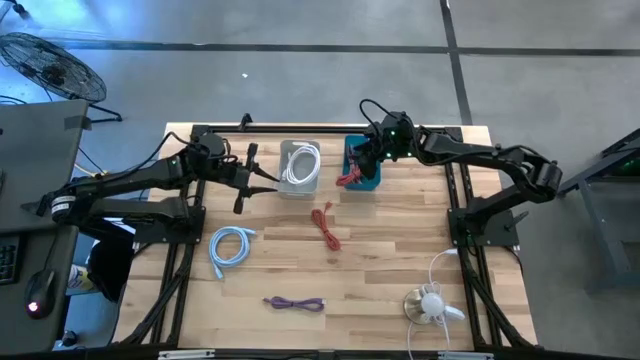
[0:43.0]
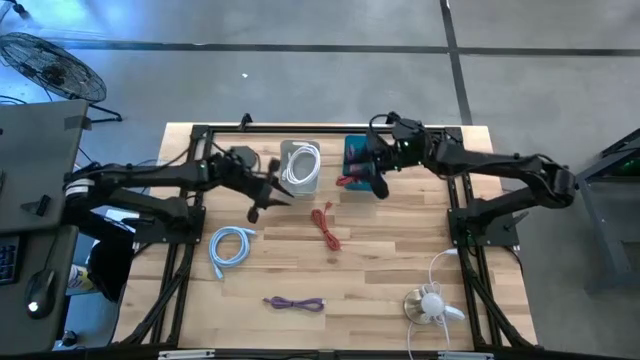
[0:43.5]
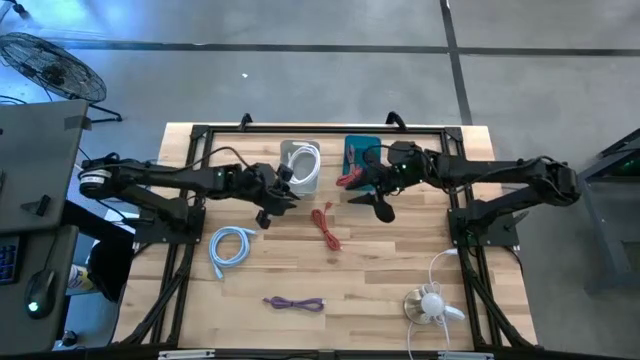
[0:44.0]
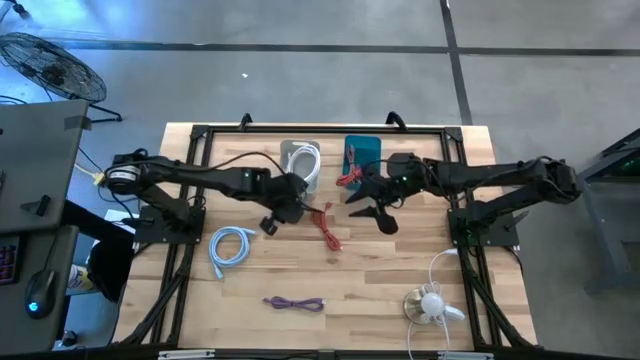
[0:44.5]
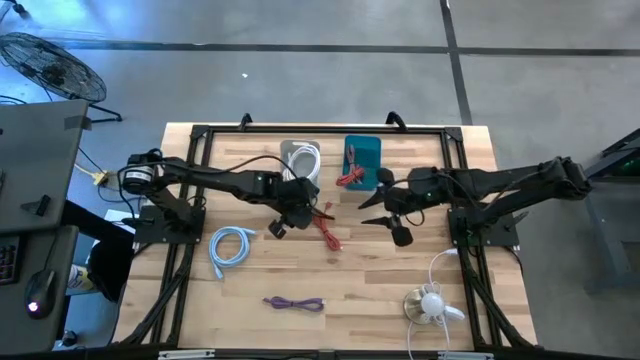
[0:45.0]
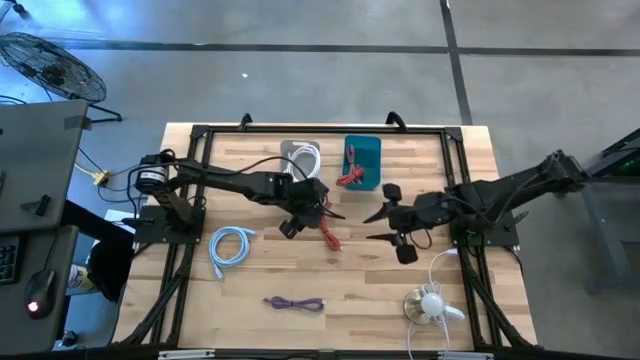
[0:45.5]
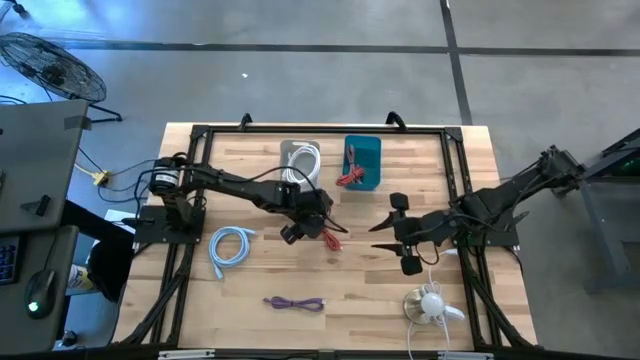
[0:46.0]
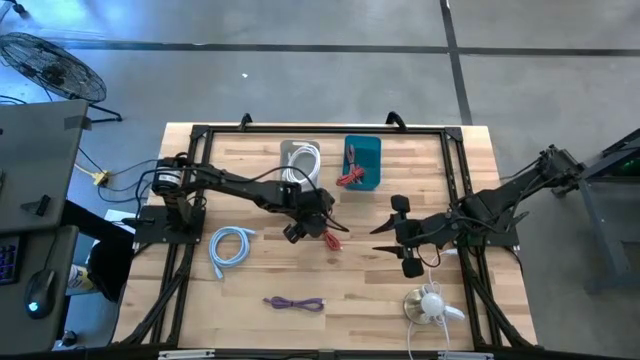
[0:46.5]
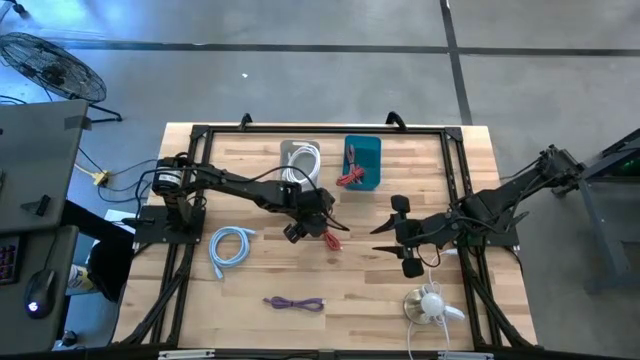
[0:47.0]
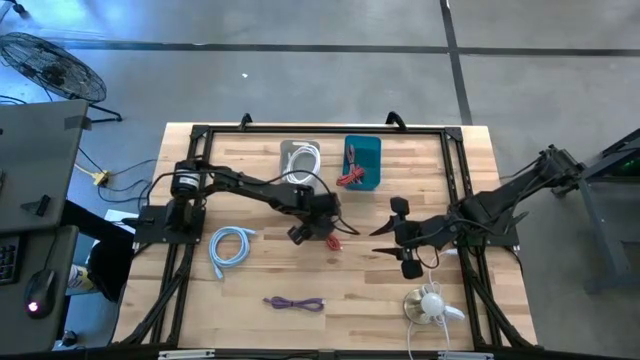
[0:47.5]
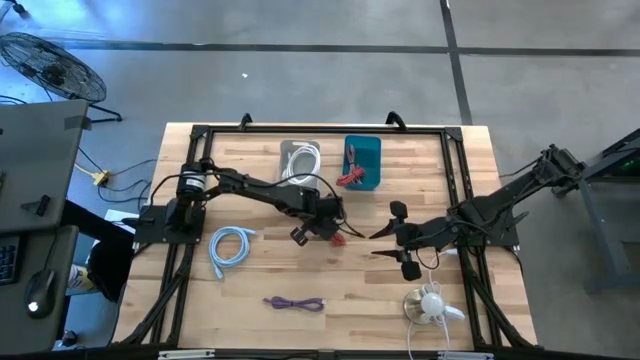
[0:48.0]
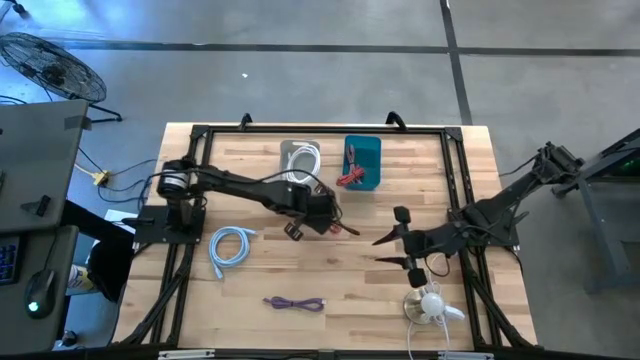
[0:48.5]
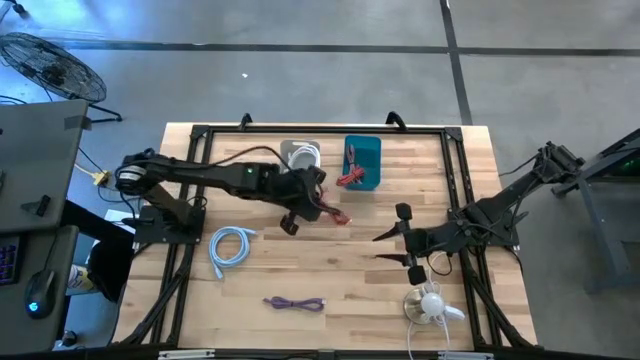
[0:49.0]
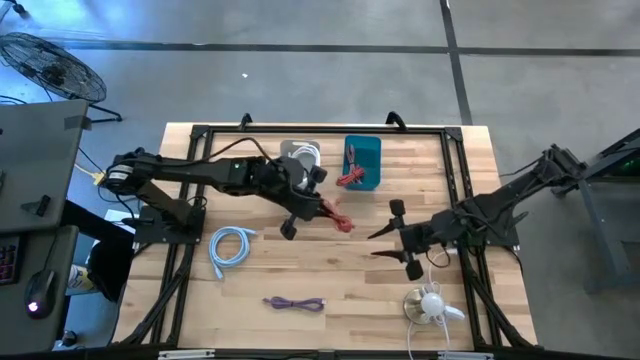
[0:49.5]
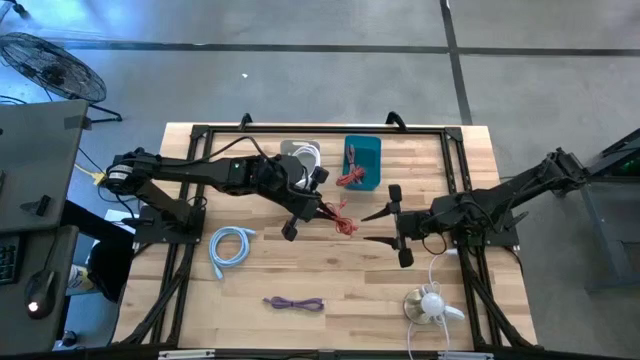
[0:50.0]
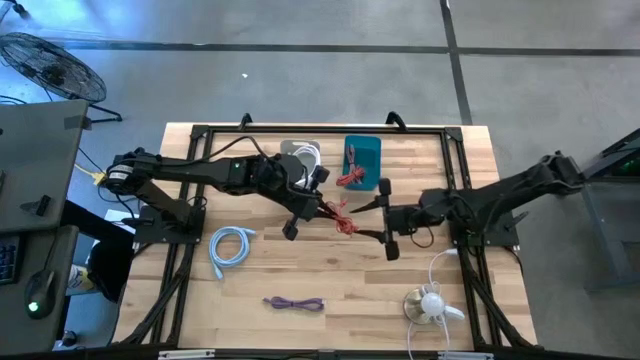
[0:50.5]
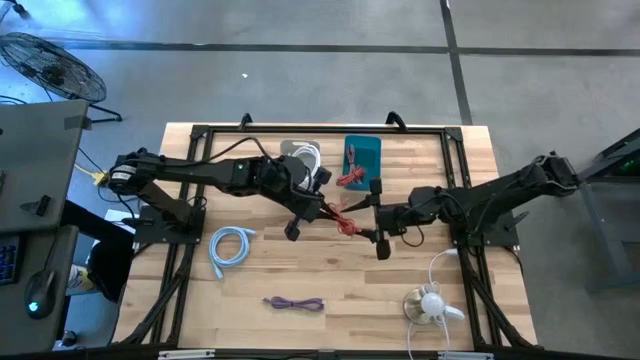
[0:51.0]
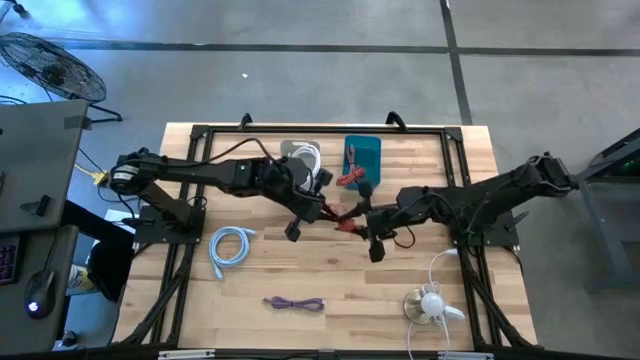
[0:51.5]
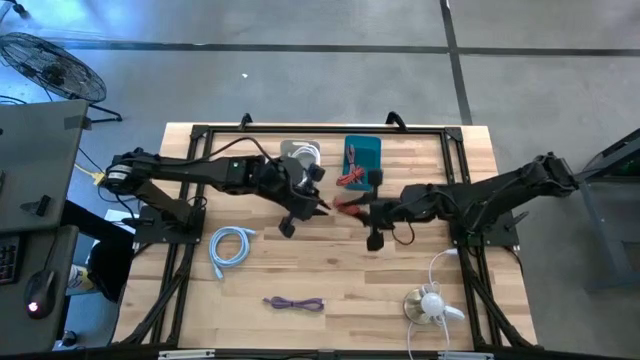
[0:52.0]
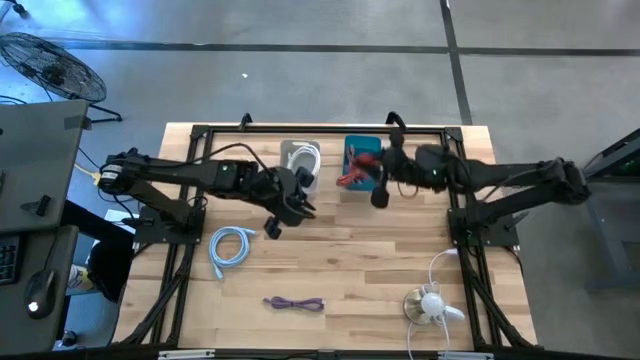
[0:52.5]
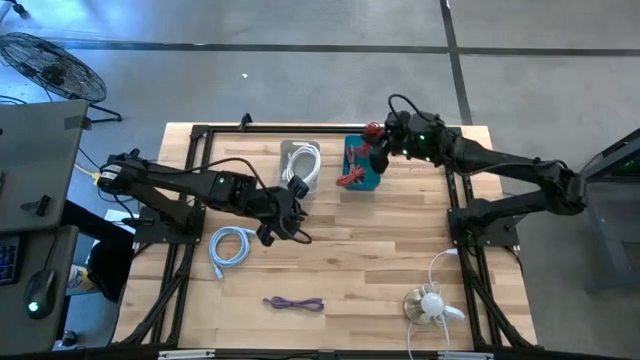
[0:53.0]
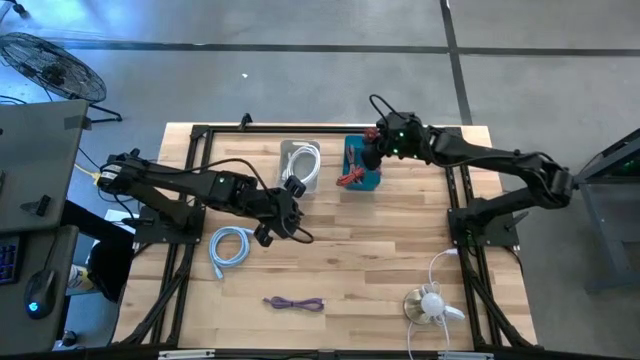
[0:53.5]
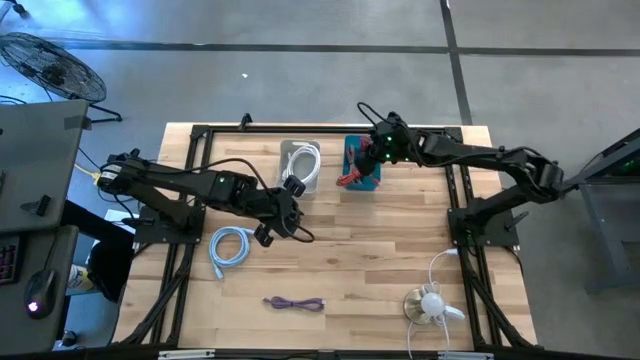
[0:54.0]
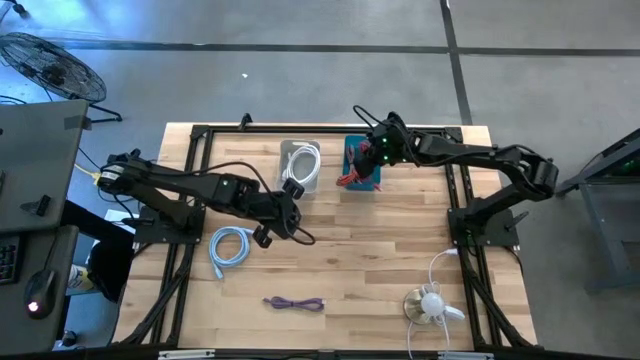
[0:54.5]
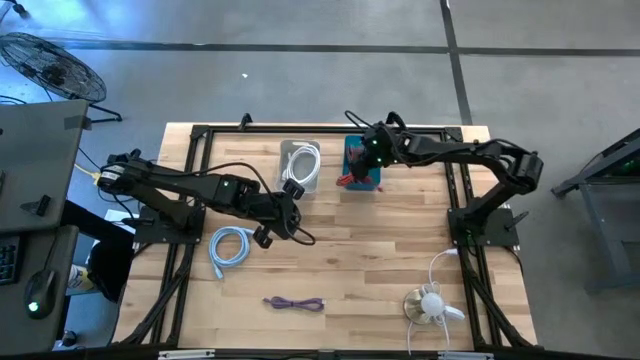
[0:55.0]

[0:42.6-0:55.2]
Task: Pick & Place USB Port
Put the orange charger cable into the blue bin

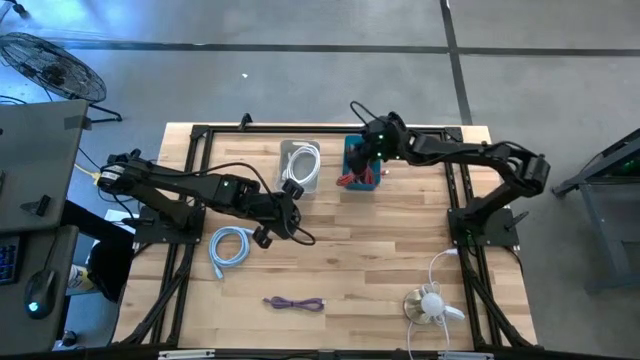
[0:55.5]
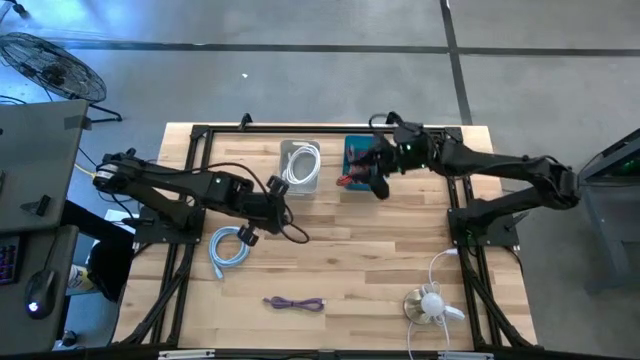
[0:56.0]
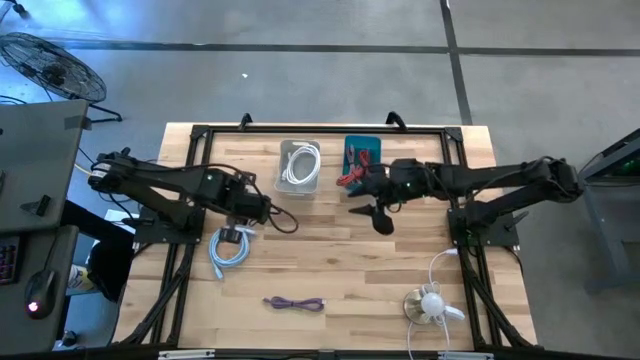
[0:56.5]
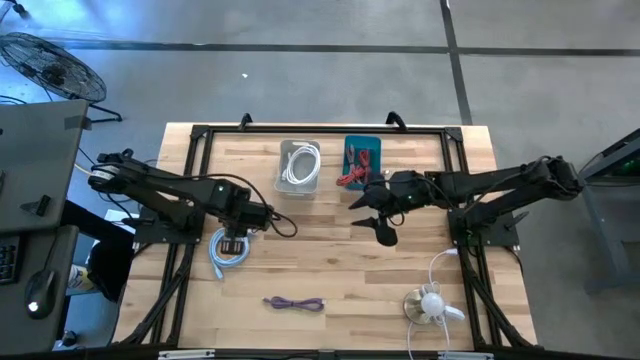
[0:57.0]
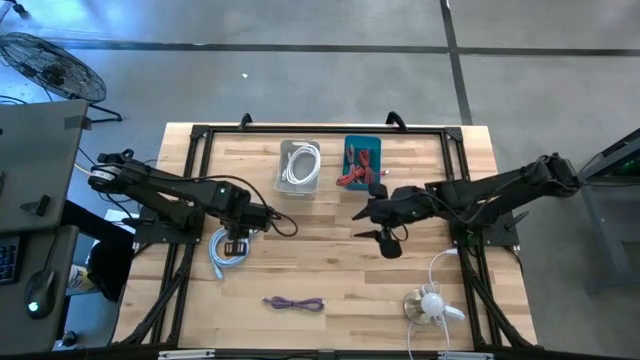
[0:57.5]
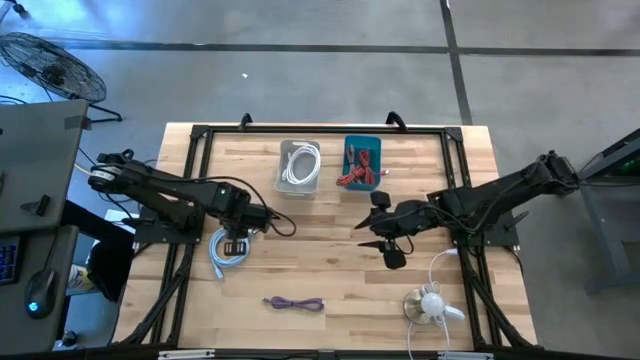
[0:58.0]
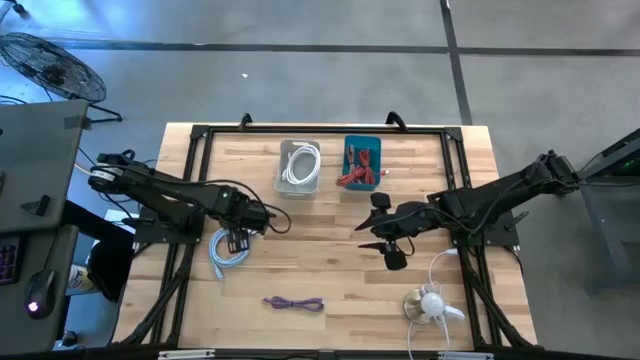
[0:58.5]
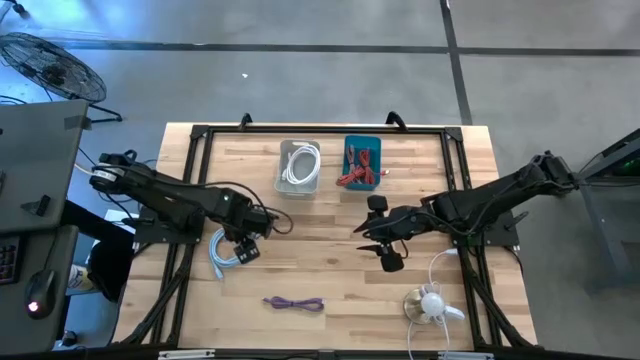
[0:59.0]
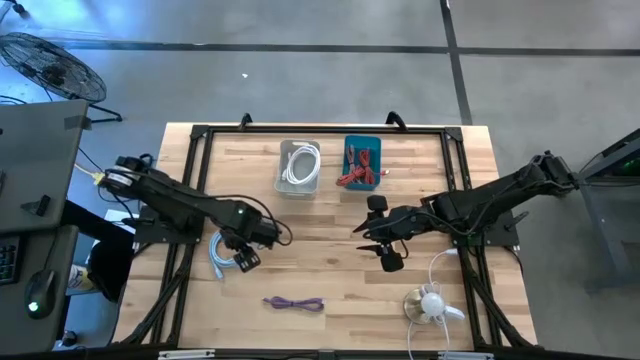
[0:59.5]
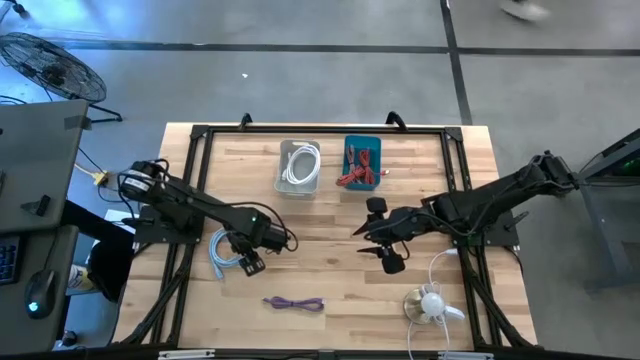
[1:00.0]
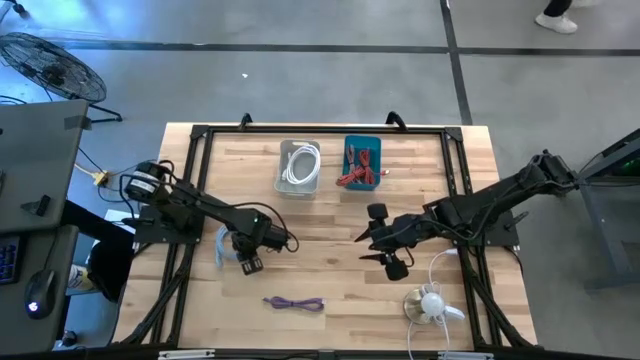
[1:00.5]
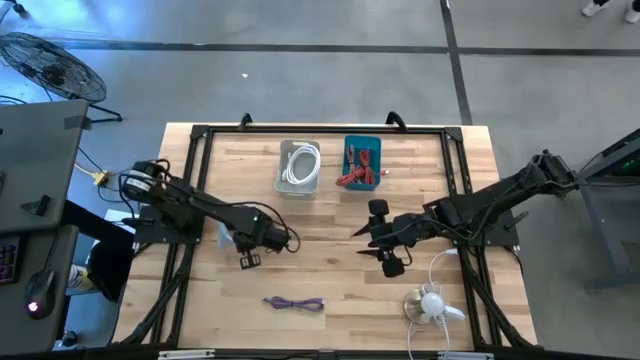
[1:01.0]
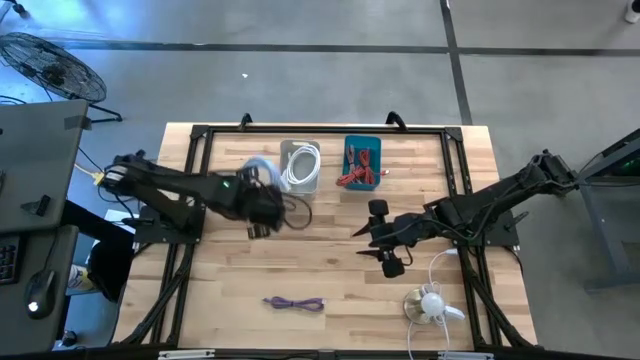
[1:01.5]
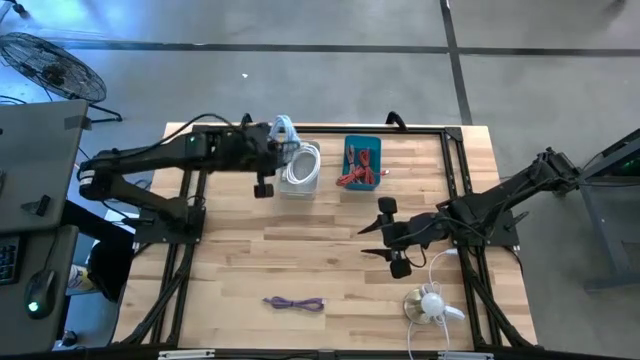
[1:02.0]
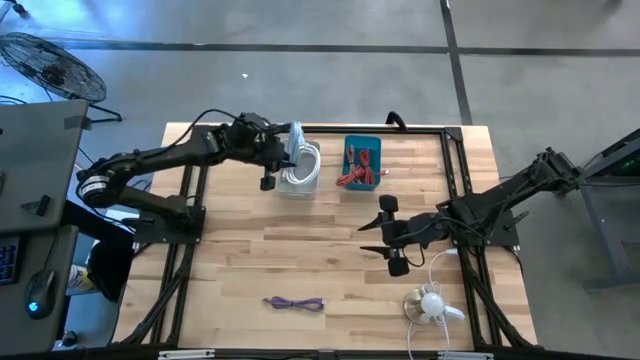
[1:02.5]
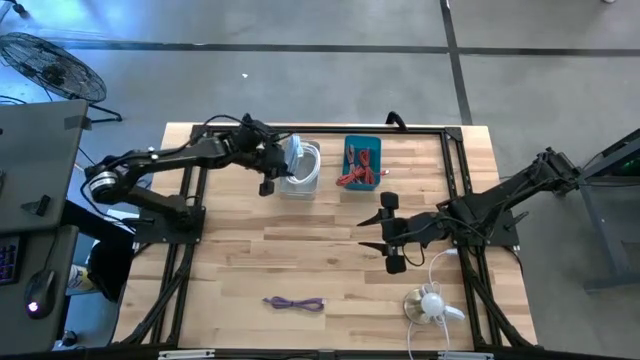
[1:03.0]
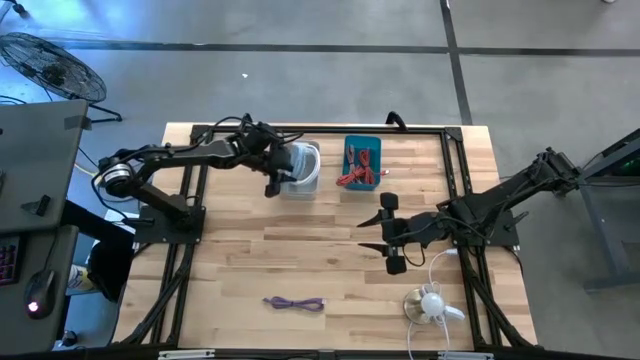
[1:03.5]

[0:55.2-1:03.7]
Put the blue HDMI cable into the gray bin
